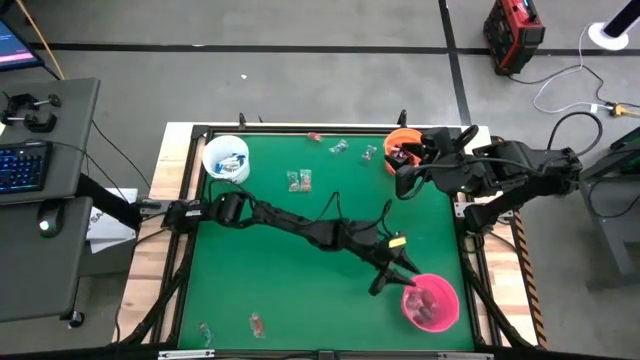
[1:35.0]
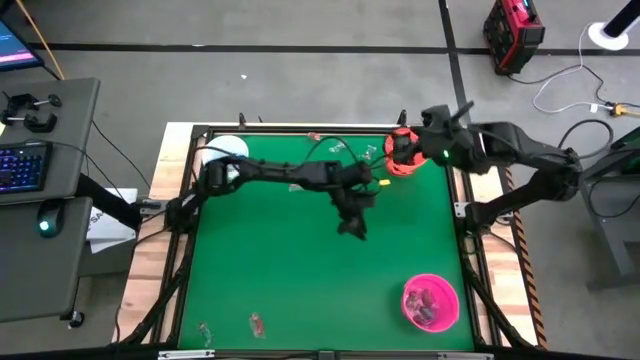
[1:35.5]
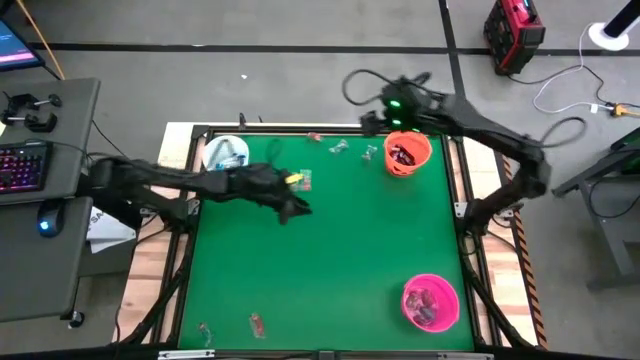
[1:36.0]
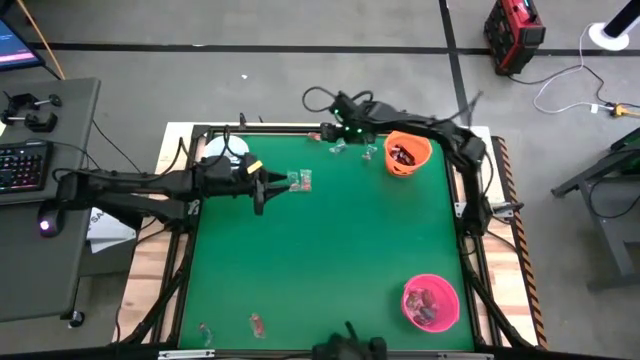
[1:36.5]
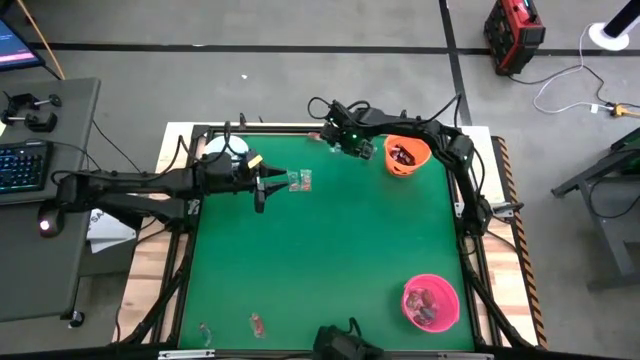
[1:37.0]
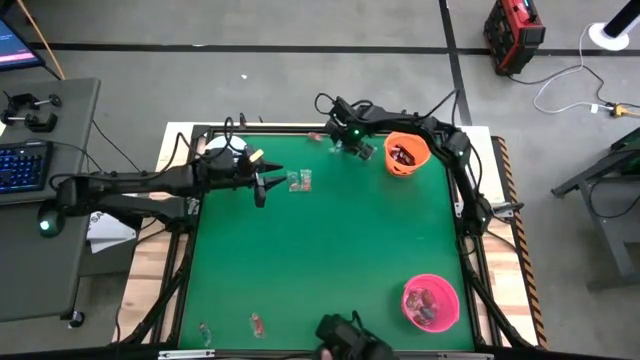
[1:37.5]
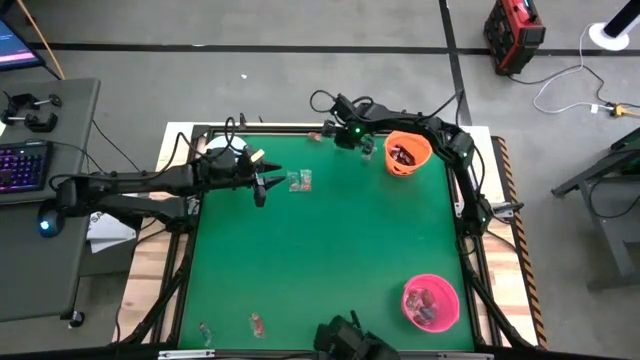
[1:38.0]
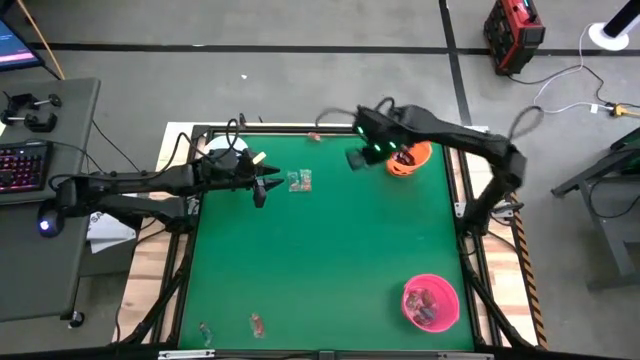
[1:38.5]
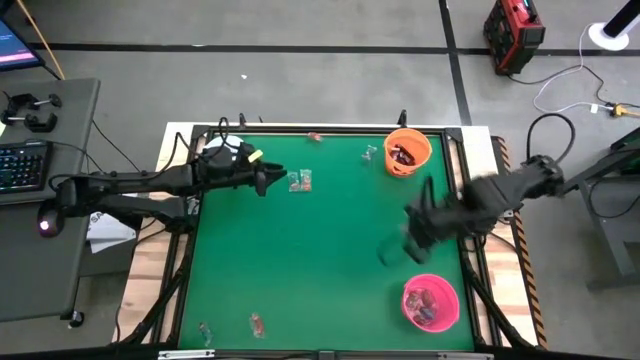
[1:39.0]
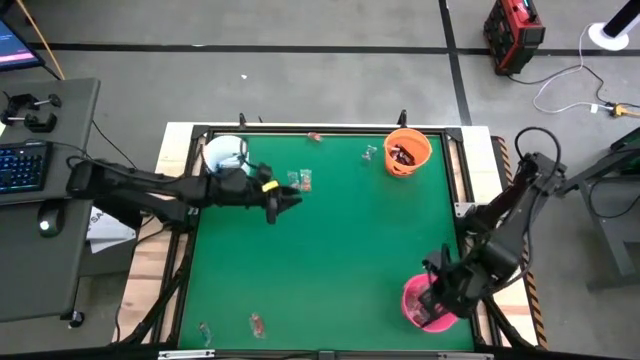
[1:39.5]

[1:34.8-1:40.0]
Task: Sort candy by brand, put in halloween buckets
Put the blue gummy into the pink bucket

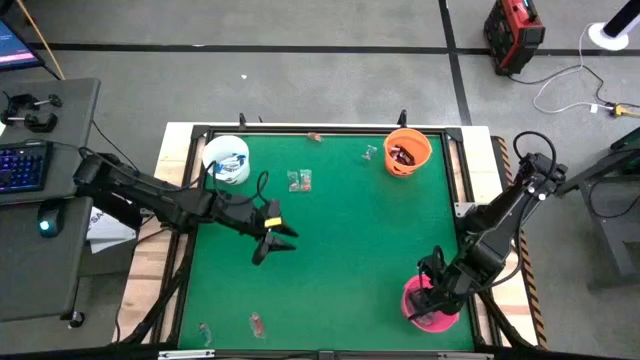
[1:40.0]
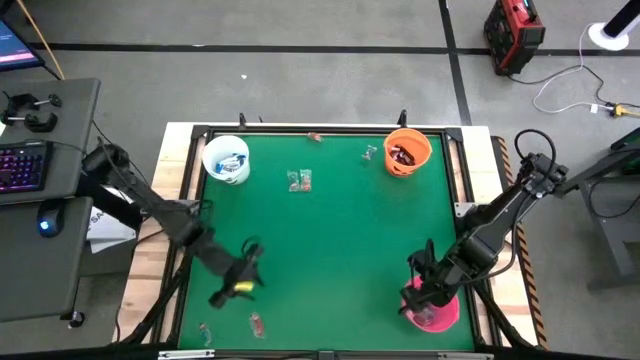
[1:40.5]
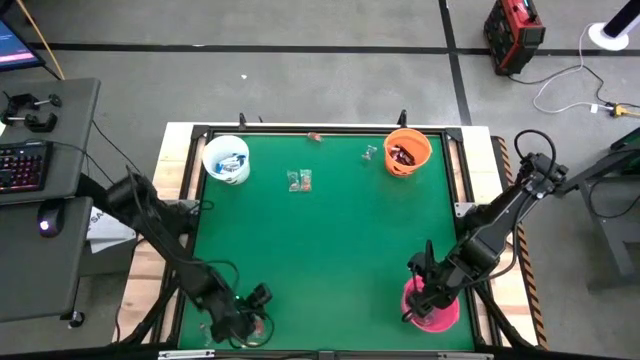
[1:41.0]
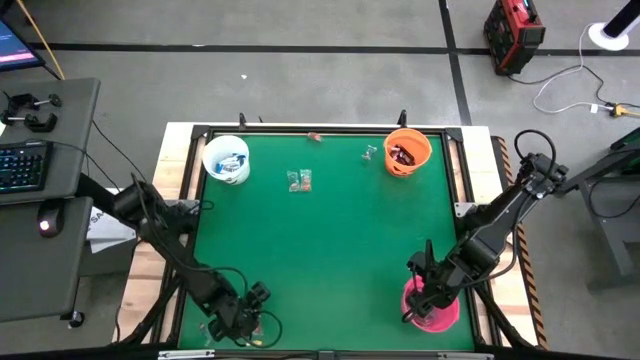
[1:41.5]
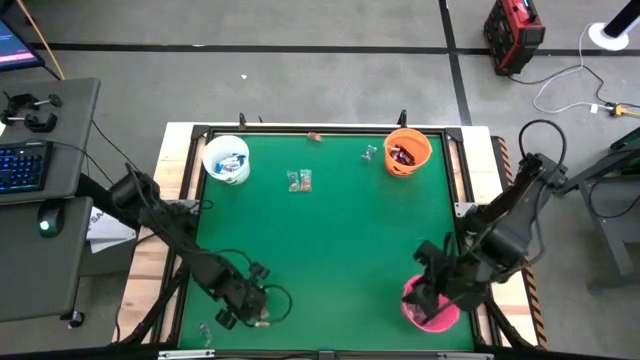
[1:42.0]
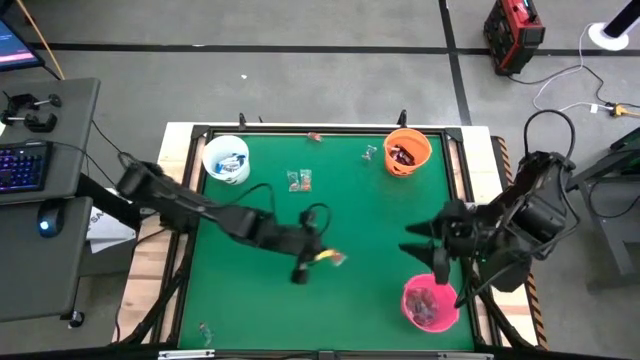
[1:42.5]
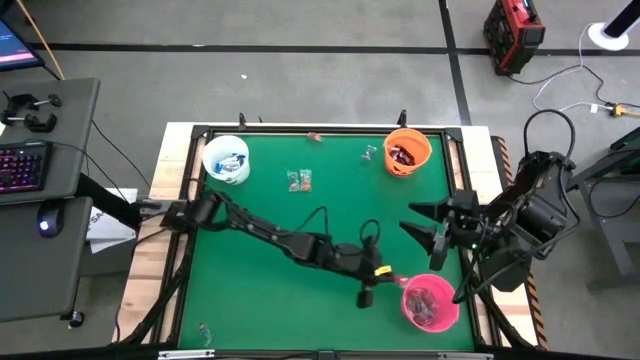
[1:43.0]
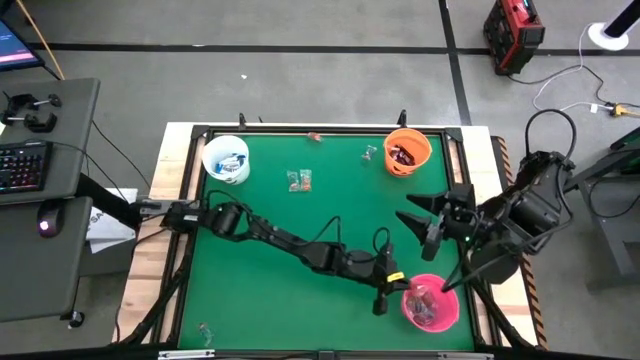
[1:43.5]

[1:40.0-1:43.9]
Put the red gummy into the pink bucket

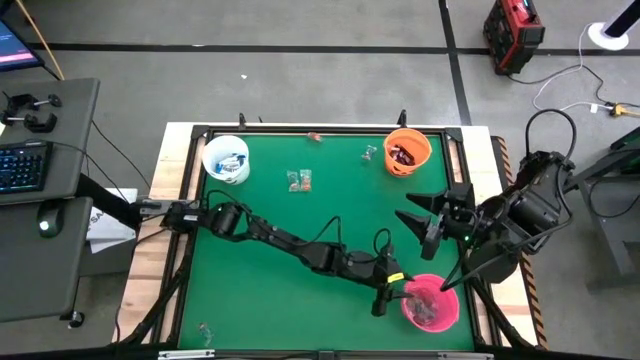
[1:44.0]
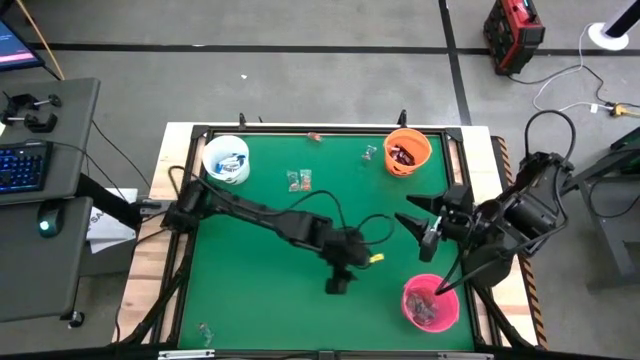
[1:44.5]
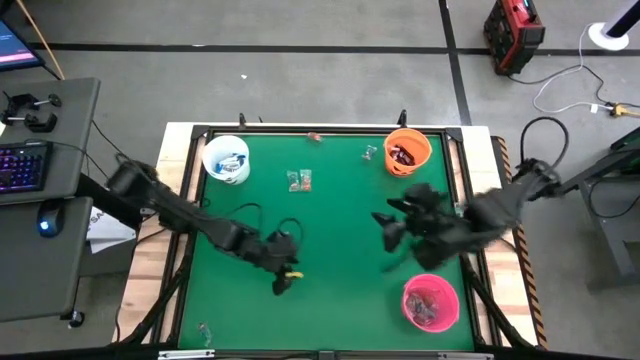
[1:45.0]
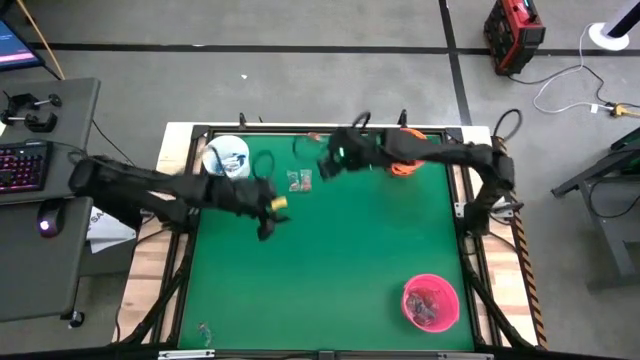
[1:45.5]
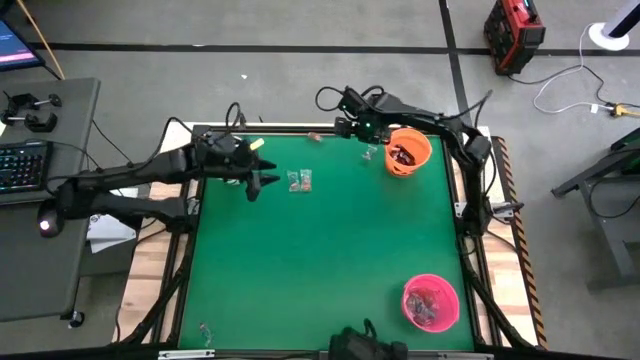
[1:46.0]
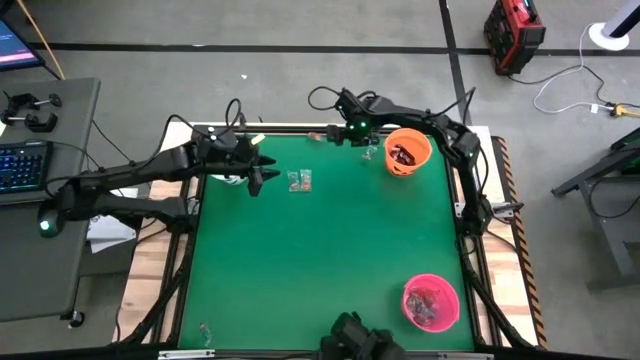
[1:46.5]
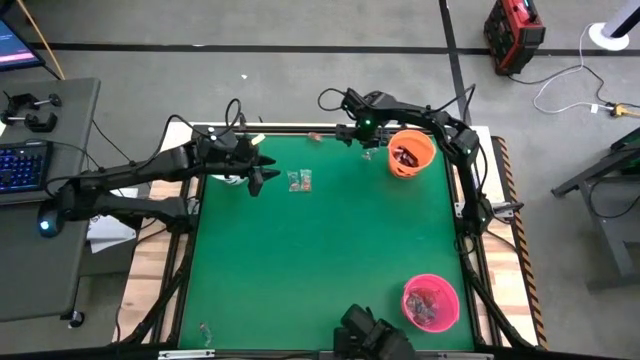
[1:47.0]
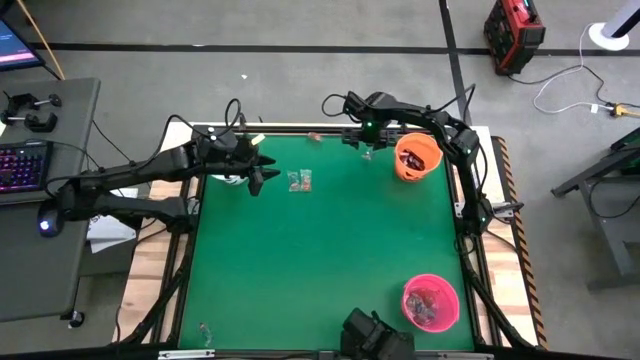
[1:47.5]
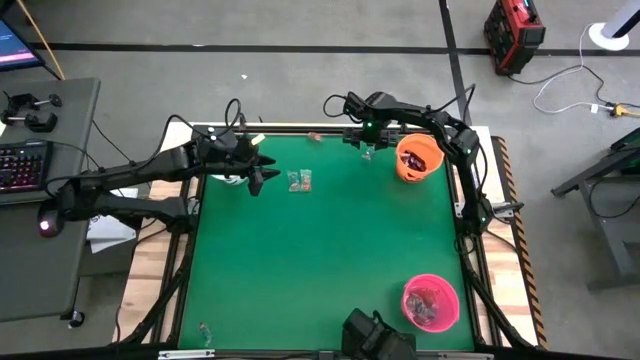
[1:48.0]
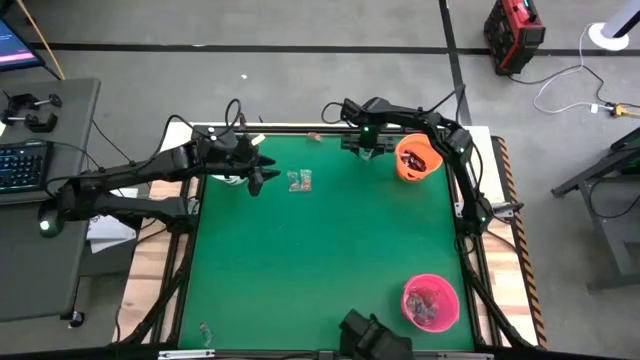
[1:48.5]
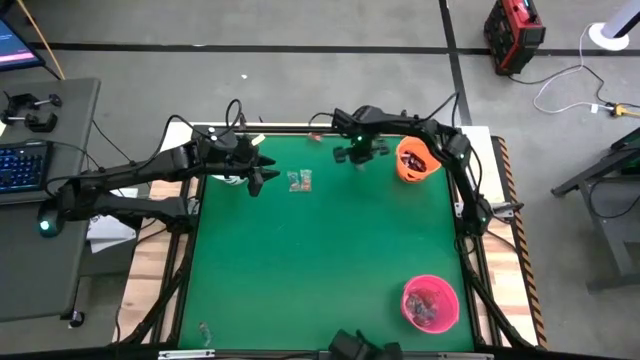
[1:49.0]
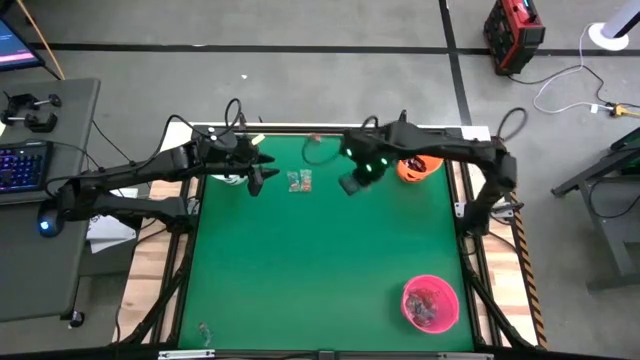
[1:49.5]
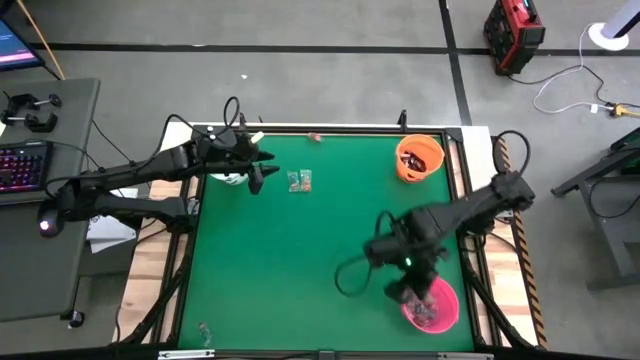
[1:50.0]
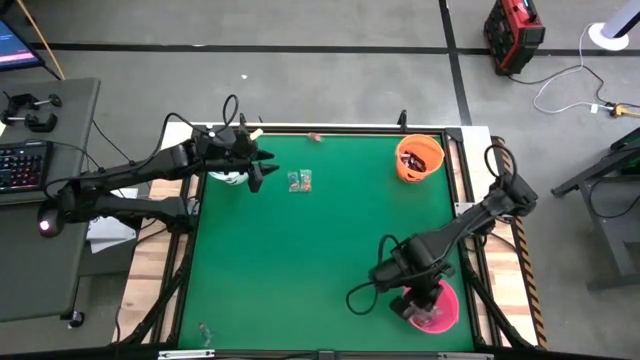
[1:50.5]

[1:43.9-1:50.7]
Put the blue gummy into the pink bucket

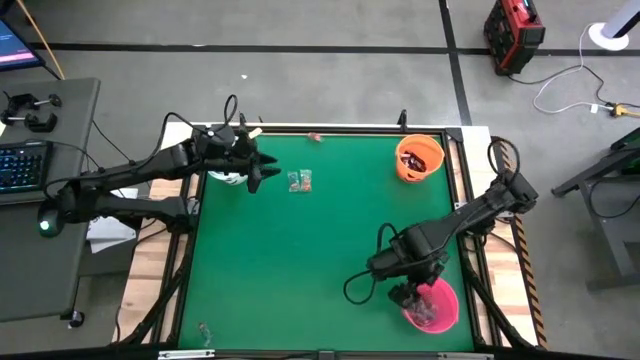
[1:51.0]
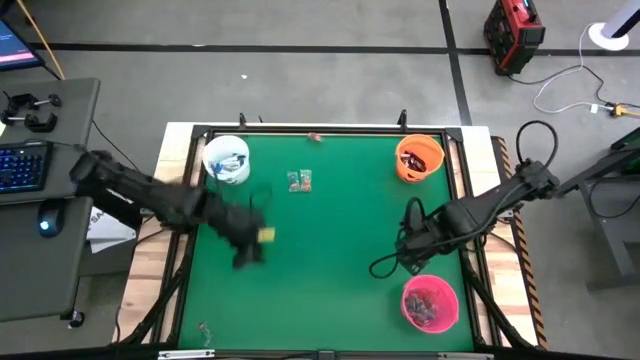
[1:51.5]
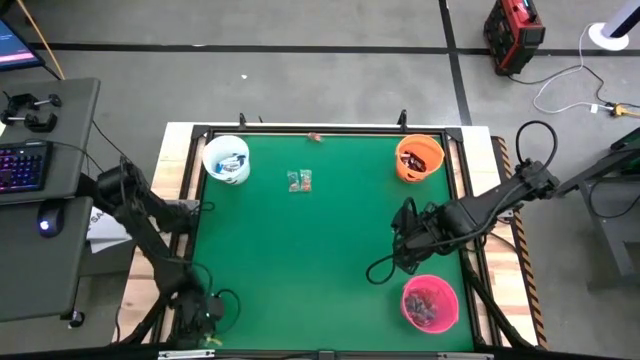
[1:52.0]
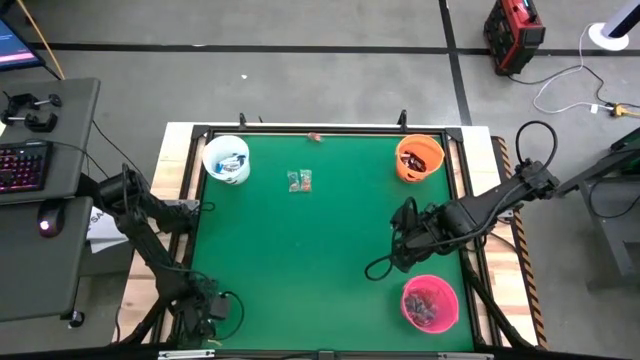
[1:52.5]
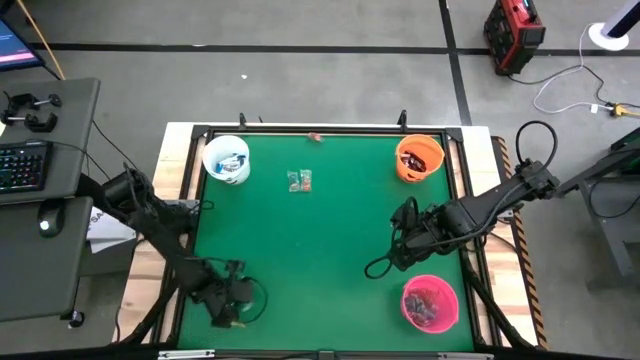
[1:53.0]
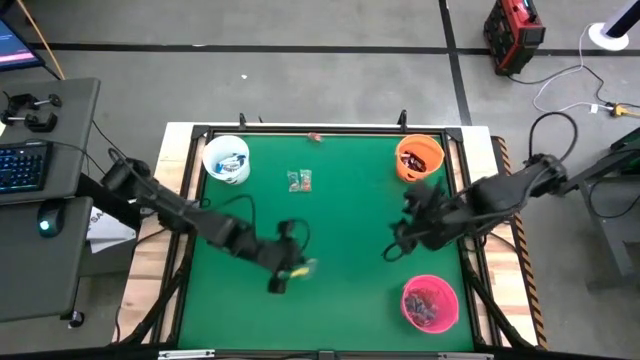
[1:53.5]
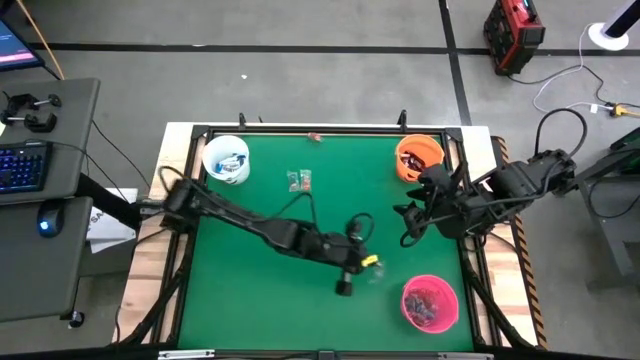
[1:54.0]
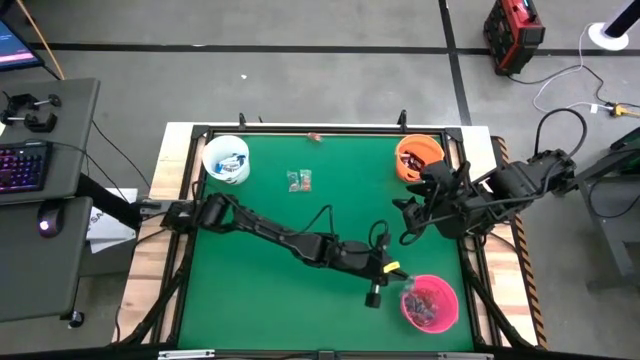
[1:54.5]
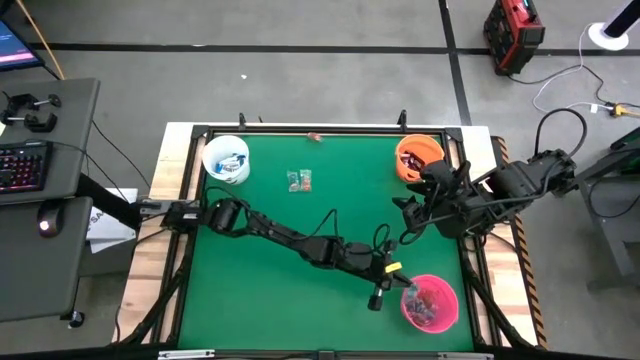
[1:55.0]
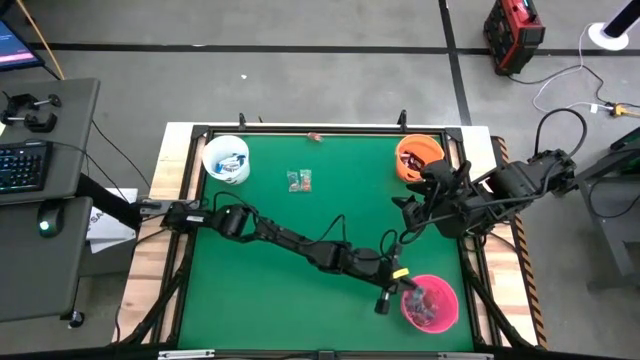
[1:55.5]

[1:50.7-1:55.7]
Put the blue gummy into the pink bucket
